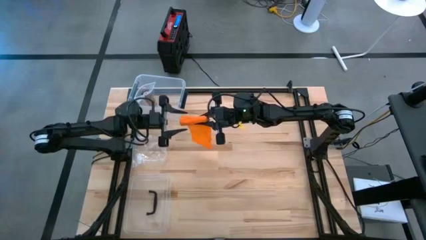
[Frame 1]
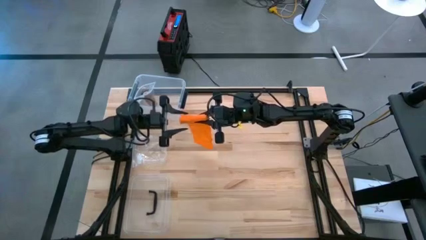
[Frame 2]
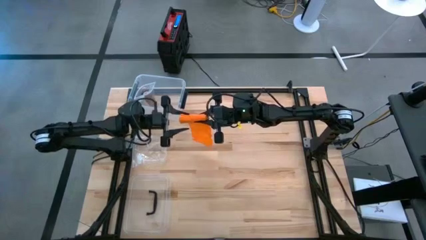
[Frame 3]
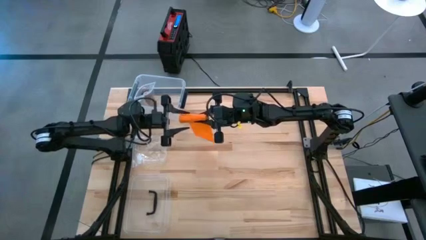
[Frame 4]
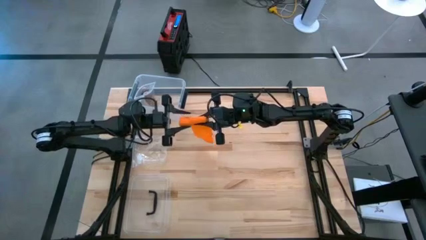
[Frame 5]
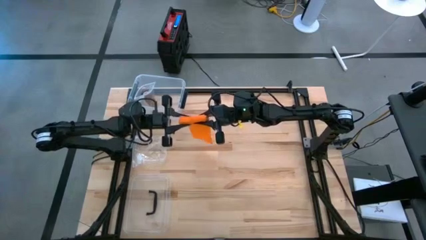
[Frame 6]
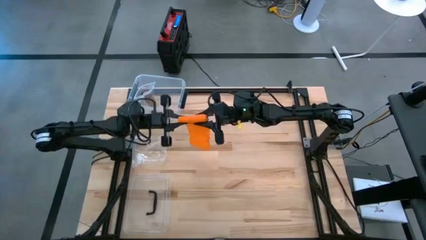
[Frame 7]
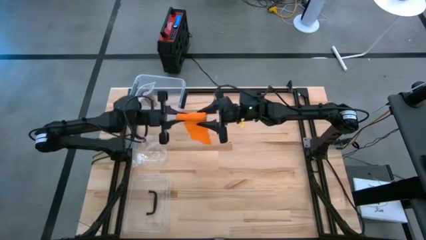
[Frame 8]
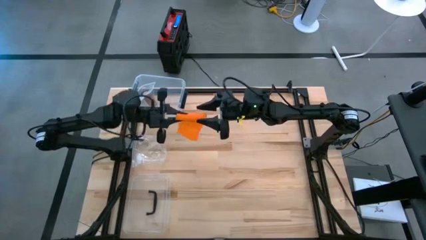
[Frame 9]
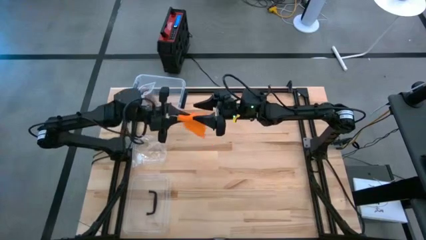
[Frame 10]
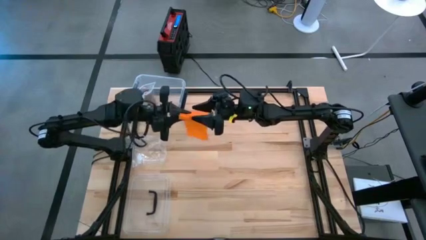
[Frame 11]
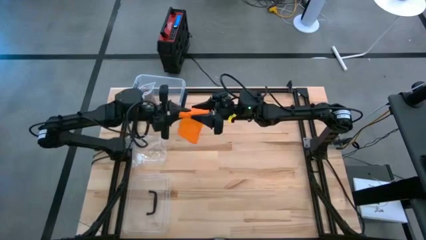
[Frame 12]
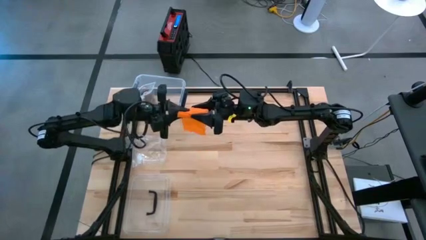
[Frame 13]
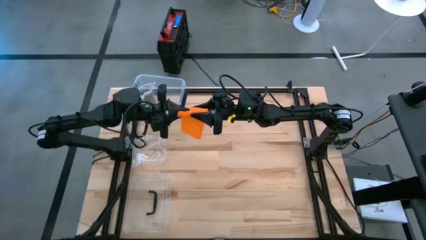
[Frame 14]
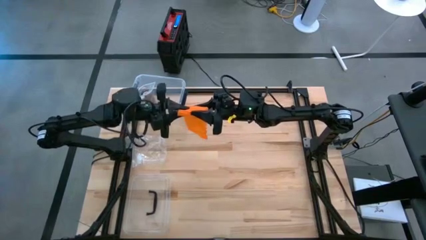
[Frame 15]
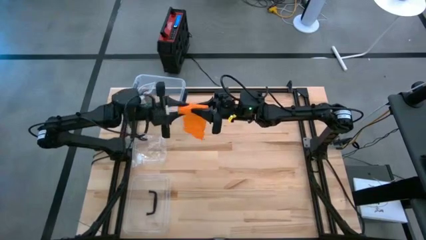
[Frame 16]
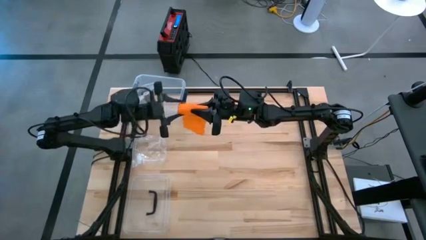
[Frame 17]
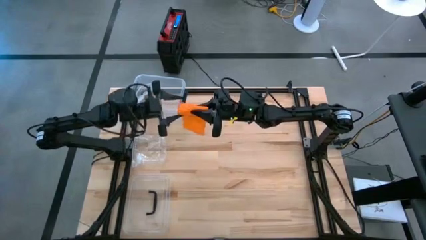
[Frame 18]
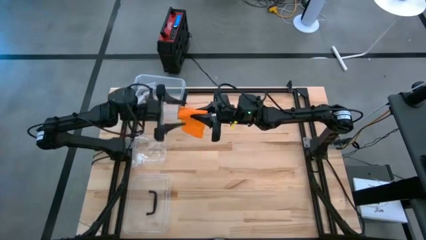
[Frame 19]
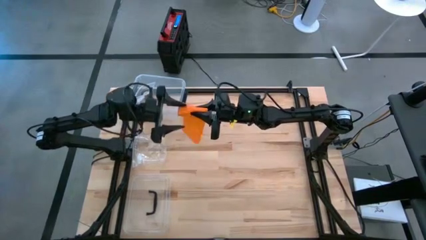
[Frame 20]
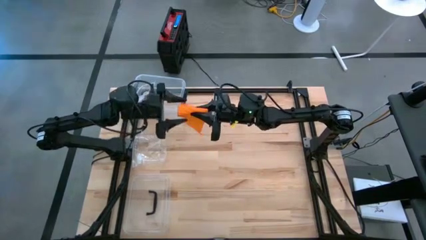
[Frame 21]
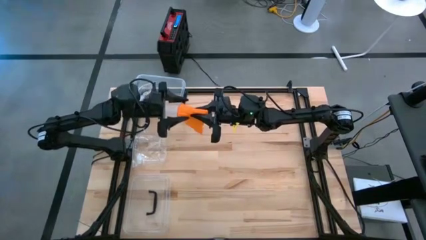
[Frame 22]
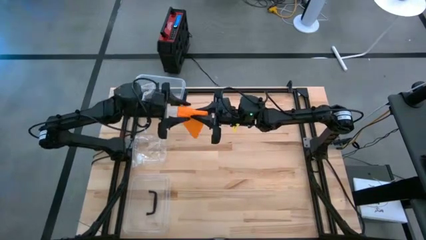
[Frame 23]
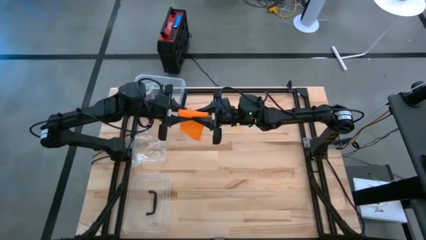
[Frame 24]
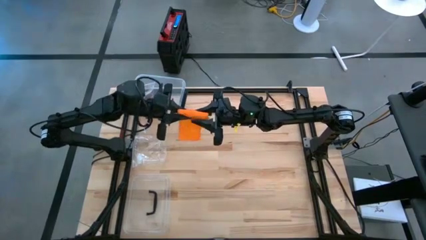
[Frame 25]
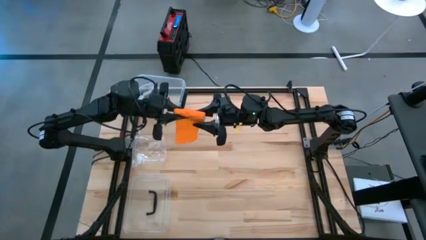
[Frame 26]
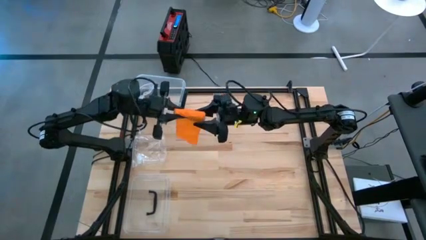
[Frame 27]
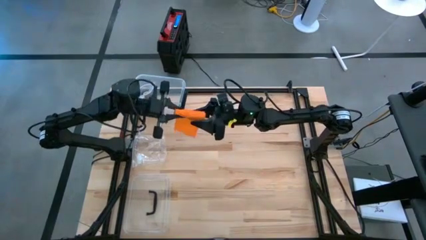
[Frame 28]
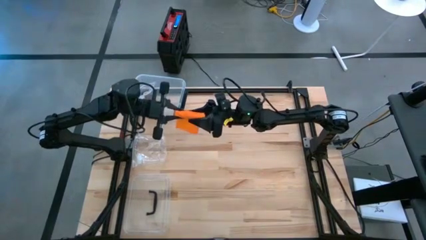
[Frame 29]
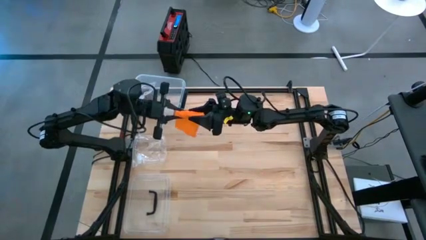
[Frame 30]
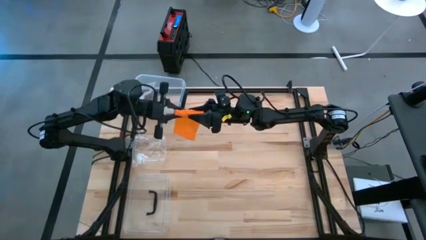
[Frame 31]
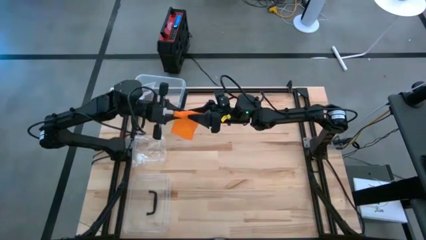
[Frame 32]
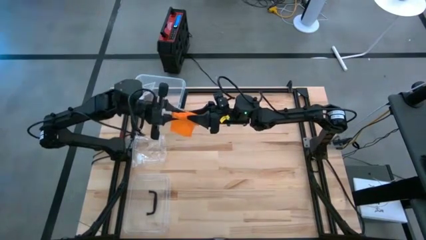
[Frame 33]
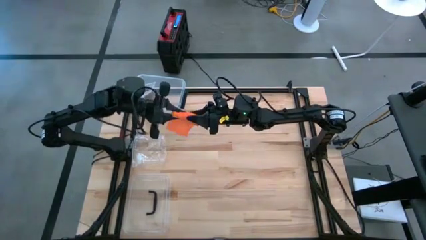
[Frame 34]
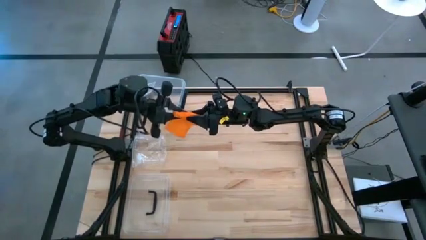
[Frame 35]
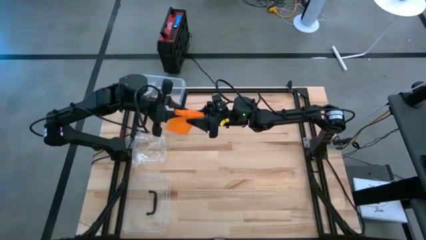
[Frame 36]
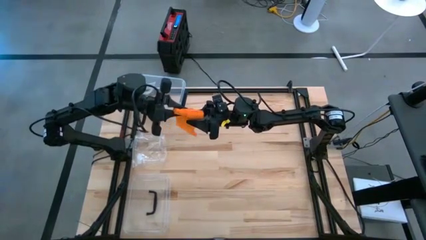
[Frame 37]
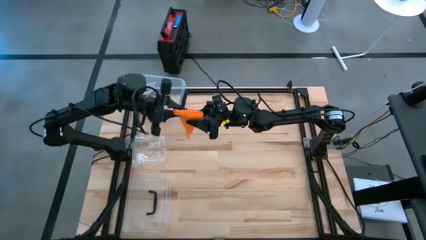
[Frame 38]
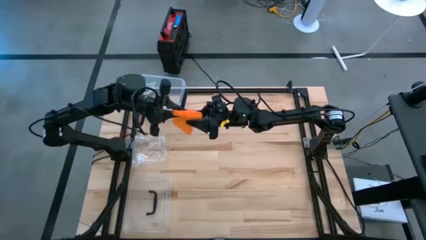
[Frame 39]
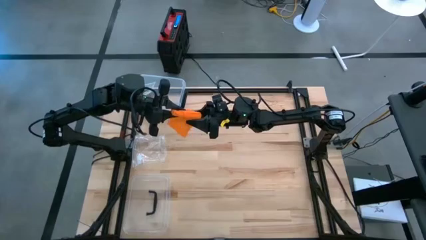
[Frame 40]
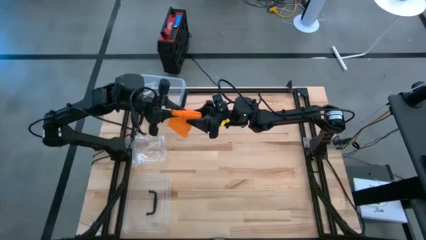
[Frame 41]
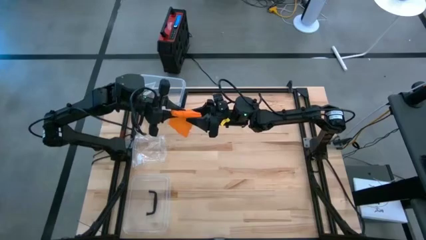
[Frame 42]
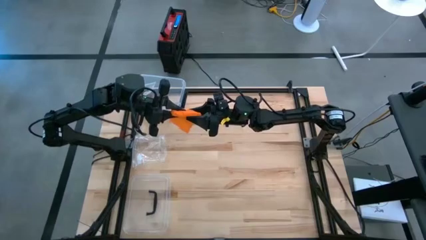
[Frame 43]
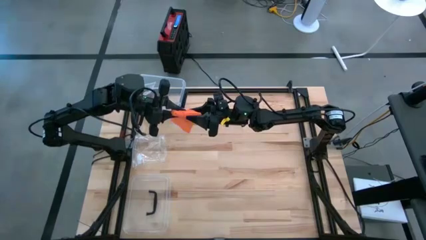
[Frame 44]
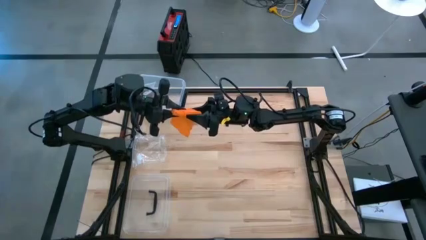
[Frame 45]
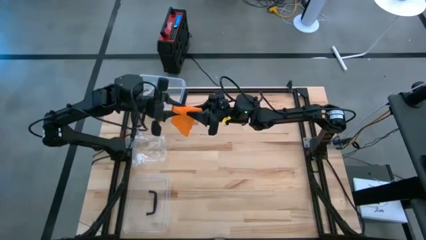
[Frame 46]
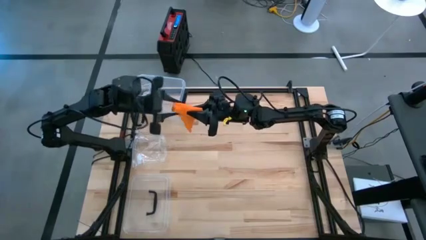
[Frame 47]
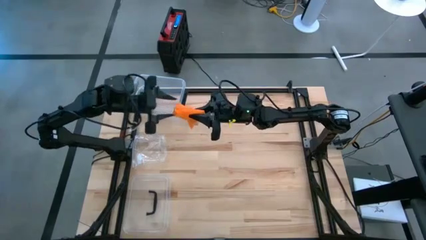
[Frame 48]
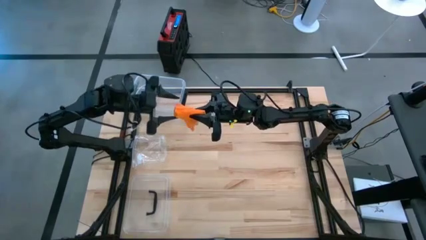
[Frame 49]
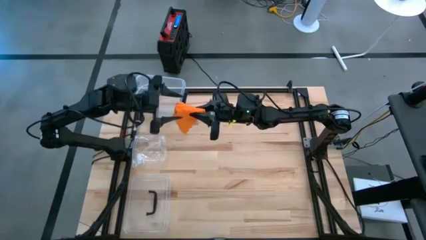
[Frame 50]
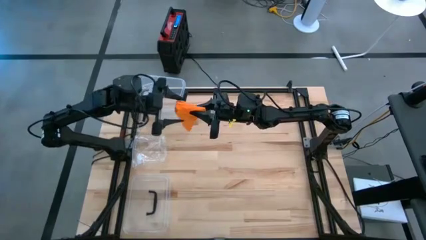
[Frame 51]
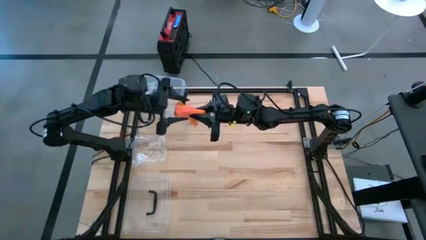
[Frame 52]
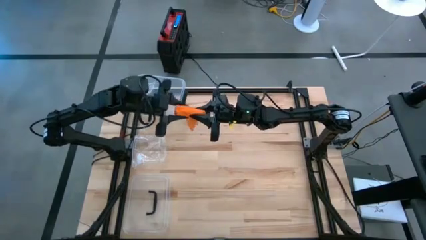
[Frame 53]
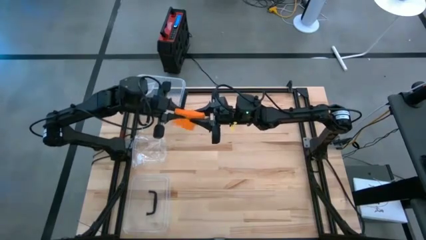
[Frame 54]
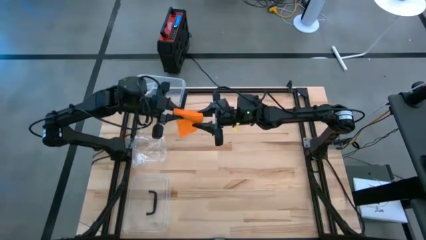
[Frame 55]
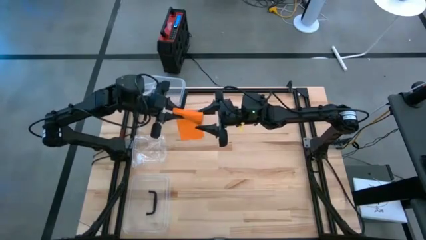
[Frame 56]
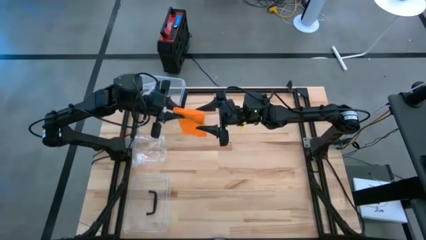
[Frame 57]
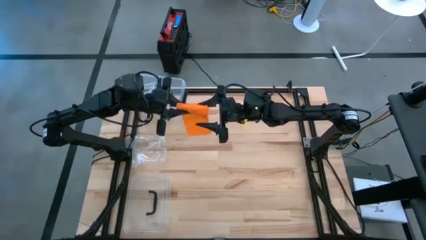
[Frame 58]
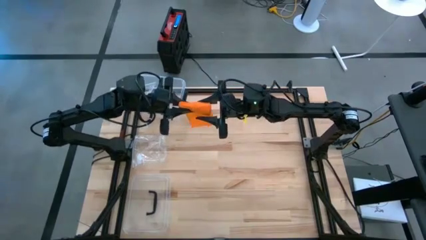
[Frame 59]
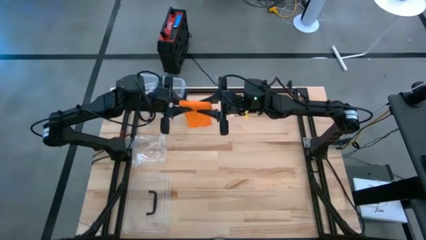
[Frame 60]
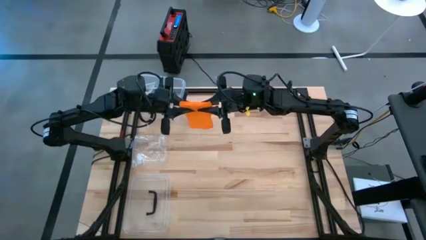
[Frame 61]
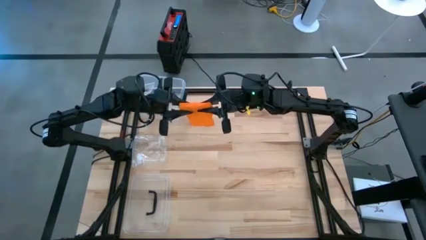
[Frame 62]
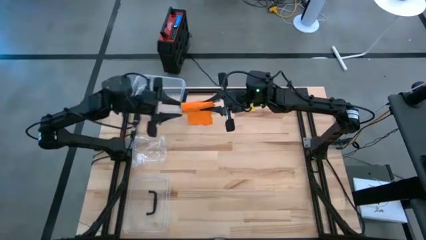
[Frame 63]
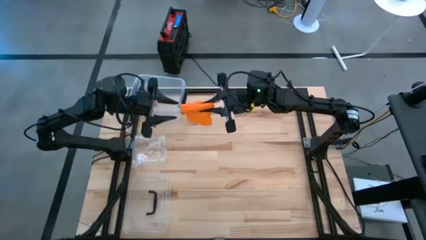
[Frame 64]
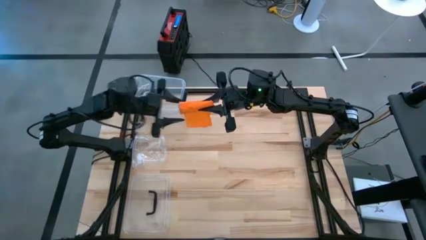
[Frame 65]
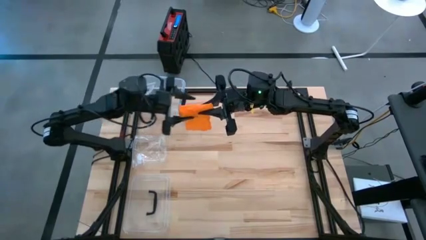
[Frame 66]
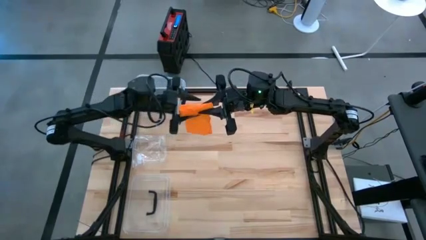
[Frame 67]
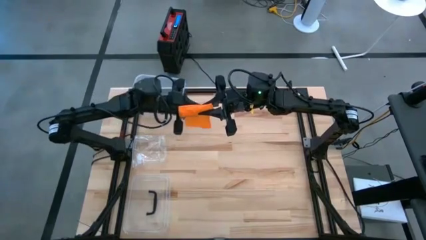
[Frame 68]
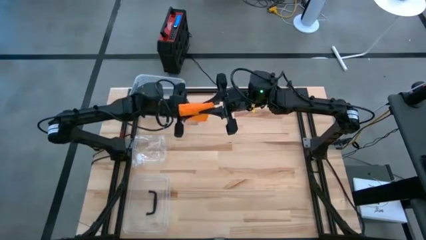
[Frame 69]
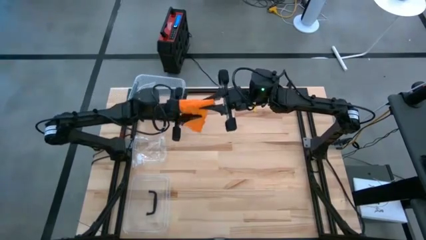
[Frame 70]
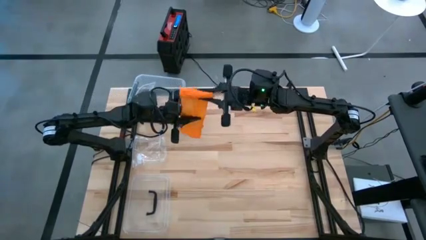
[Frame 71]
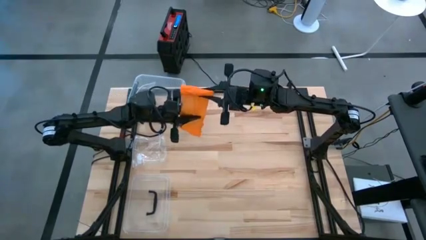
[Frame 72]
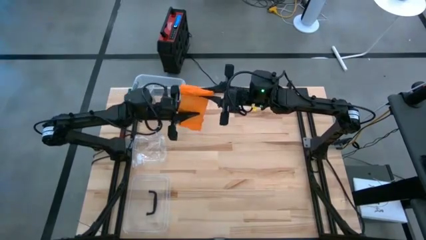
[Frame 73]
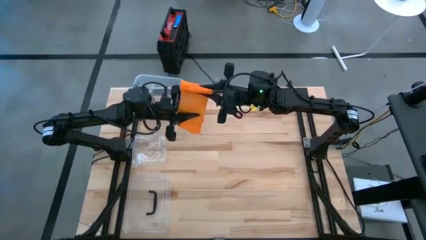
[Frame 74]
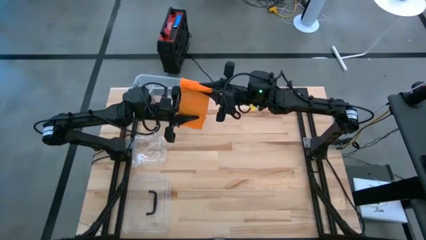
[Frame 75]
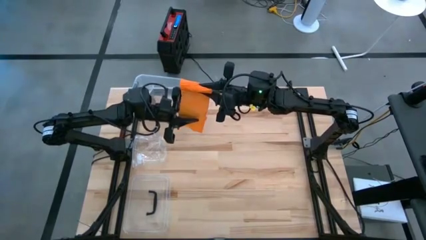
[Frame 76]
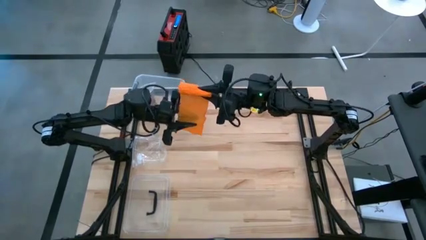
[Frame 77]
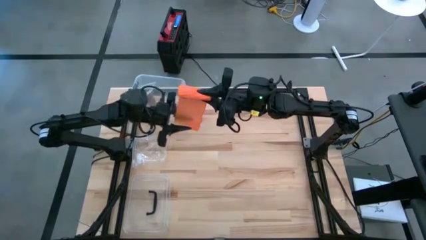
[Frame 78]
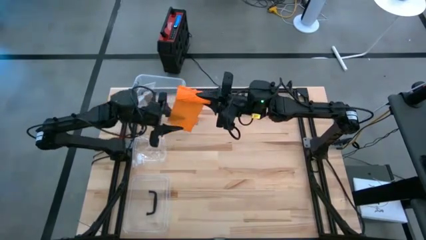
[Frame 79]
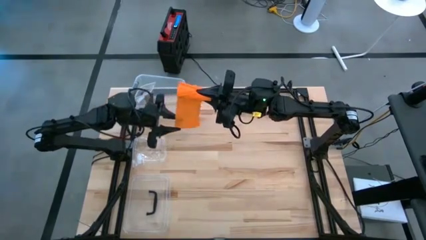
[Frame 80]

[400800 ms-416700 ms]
Task: Roll bandage
Roll the orange bandage

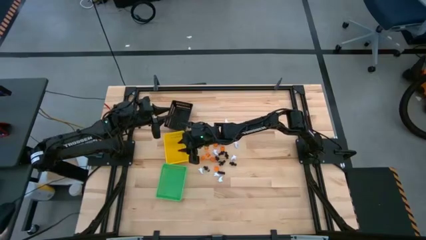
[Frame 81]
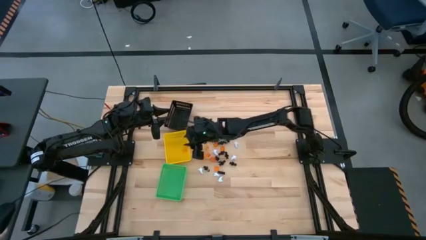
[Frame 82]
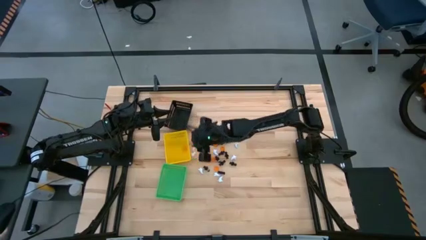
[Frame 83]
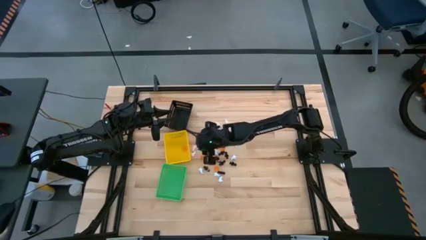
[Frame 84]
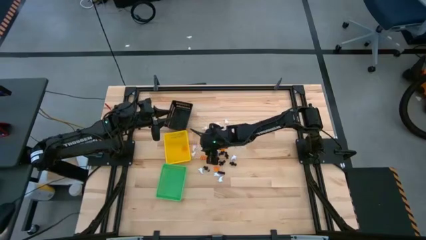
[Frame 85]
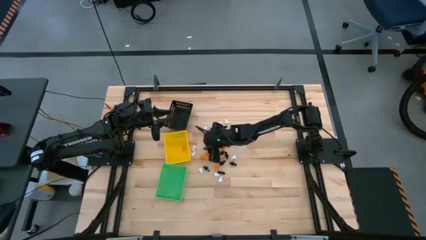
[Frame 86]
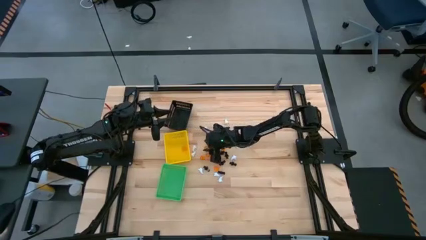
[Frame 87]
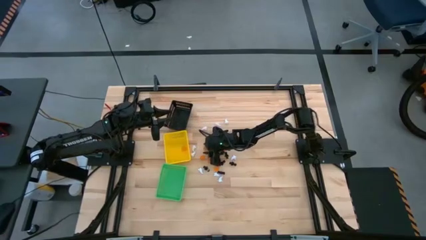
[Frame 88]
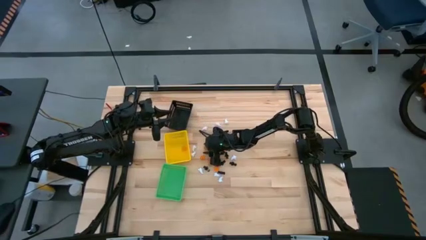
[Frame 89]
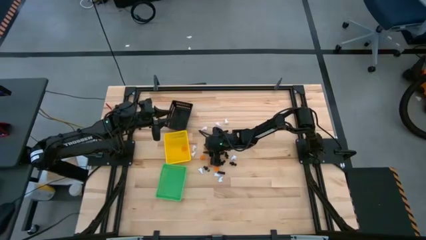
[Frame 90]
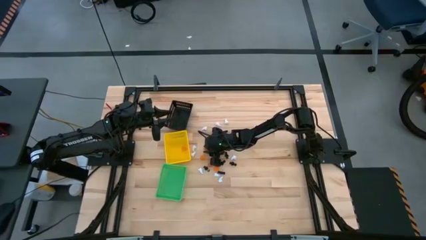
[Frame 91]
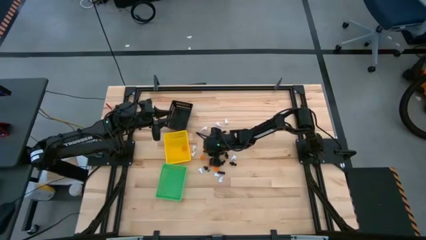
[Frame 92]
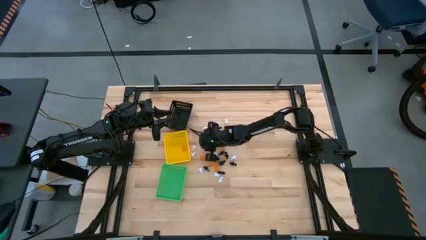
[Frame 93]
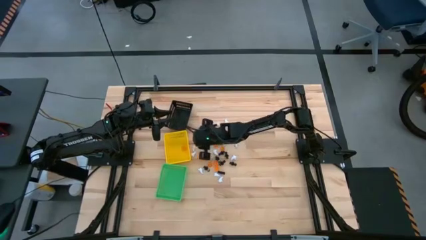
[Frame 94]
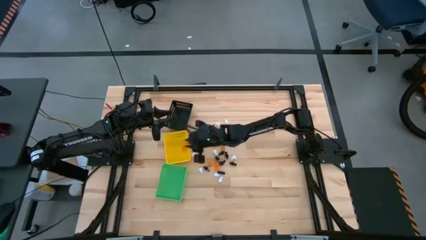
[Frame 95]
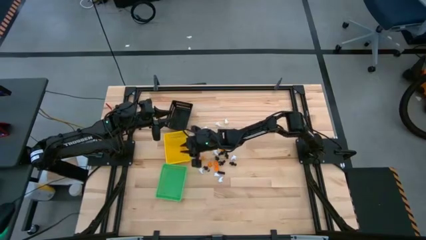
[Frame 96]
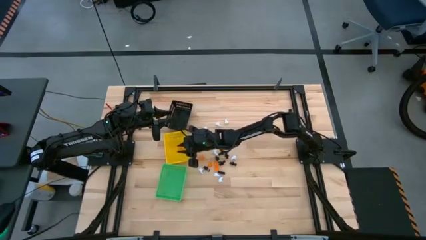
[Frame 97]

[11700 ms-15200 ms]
Task: Sort Halloween decoration
Put the orange pumpkin toy into the yellow basket
